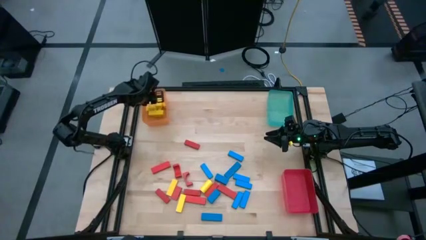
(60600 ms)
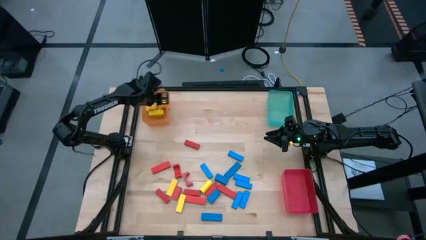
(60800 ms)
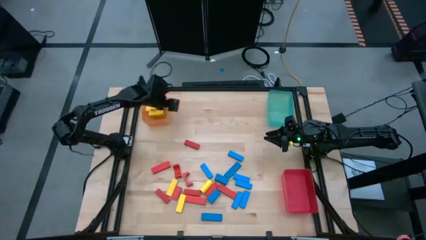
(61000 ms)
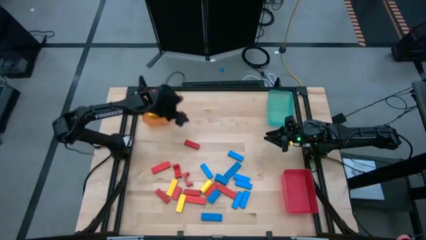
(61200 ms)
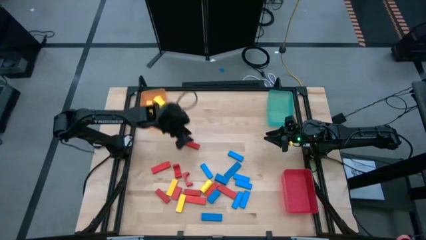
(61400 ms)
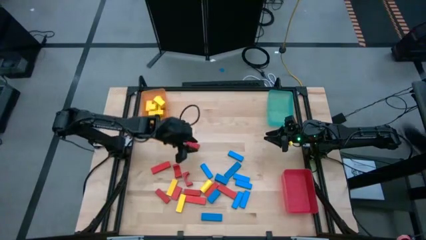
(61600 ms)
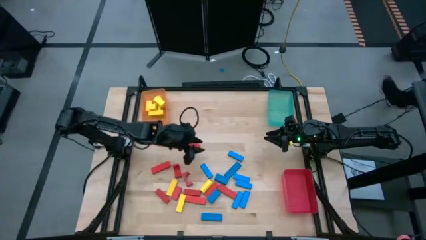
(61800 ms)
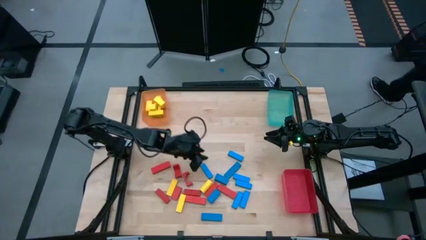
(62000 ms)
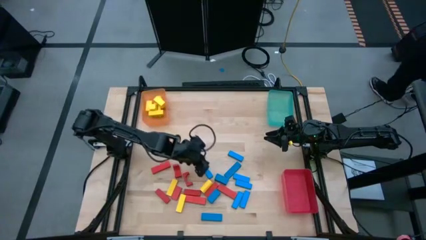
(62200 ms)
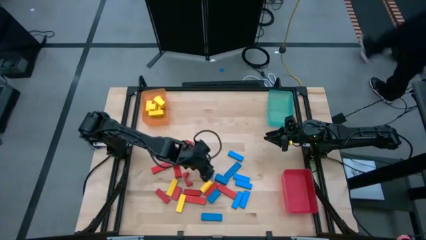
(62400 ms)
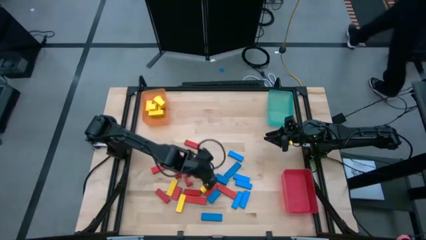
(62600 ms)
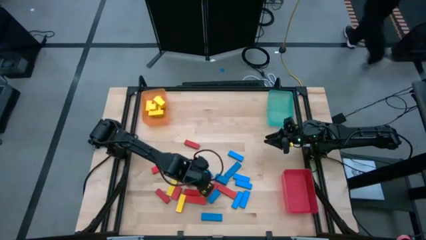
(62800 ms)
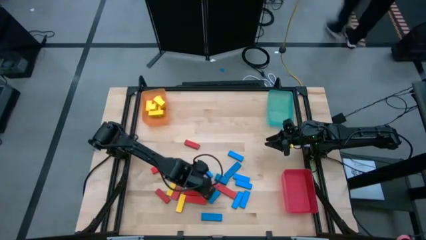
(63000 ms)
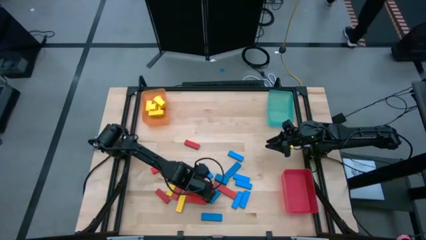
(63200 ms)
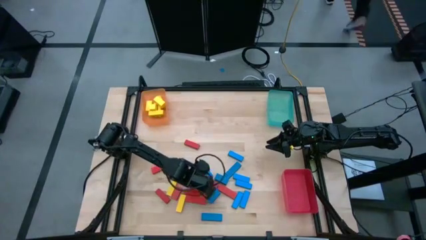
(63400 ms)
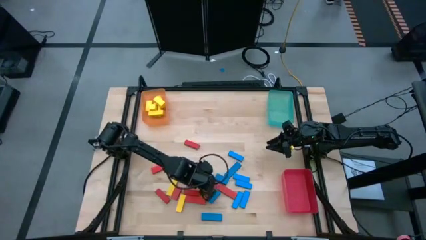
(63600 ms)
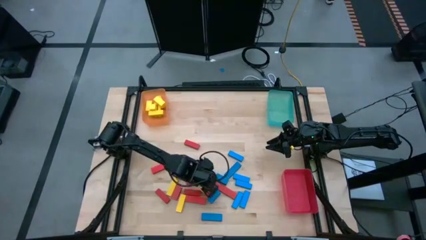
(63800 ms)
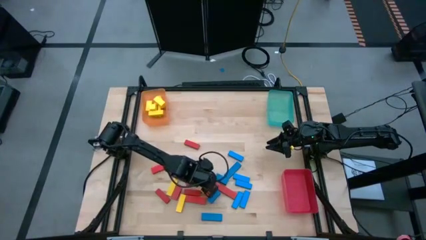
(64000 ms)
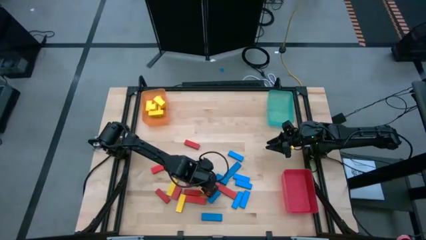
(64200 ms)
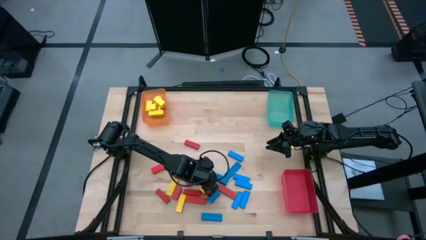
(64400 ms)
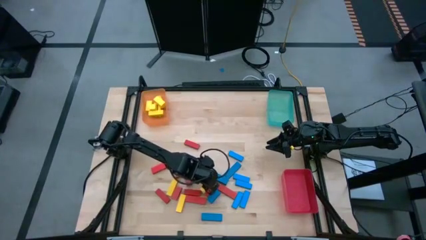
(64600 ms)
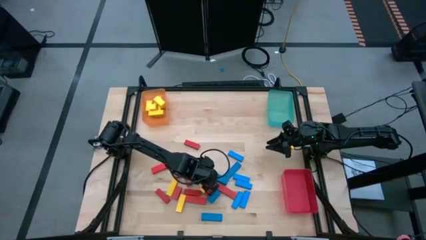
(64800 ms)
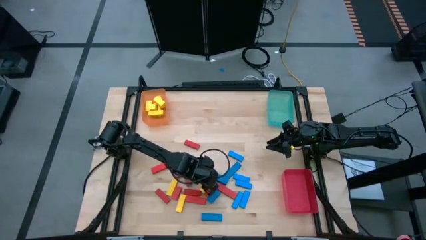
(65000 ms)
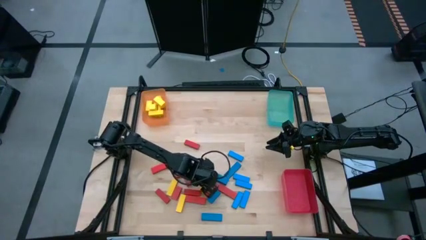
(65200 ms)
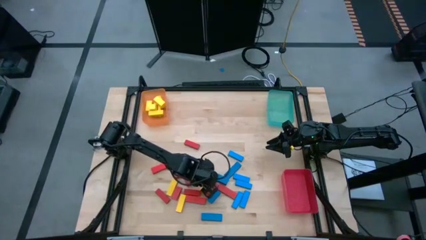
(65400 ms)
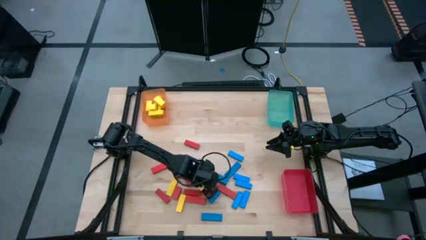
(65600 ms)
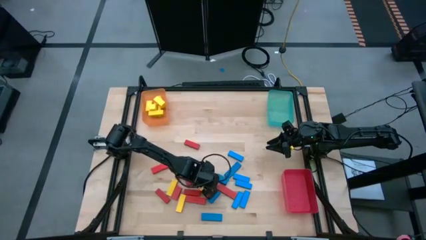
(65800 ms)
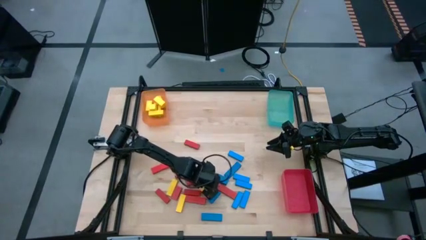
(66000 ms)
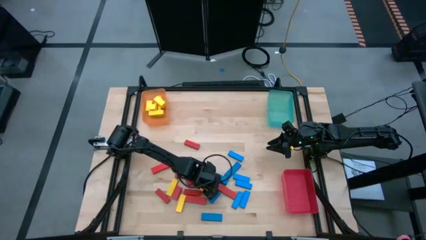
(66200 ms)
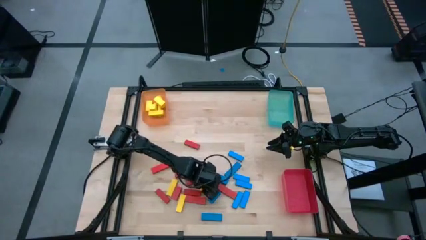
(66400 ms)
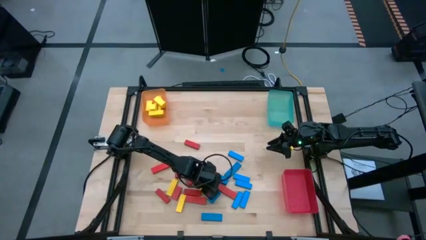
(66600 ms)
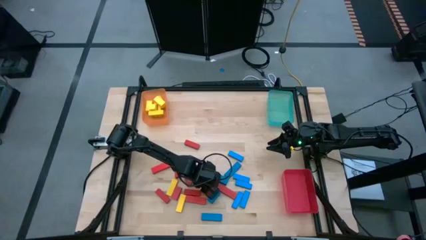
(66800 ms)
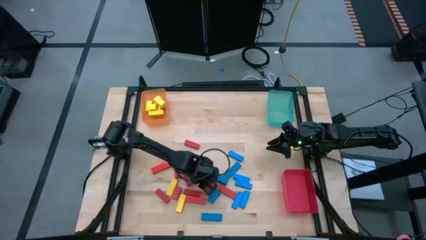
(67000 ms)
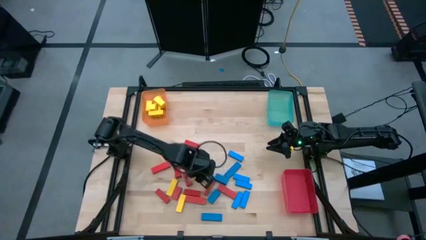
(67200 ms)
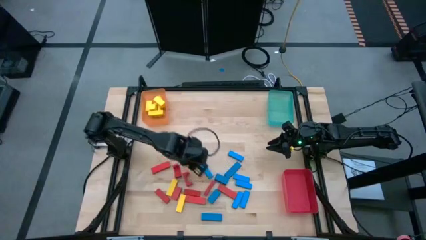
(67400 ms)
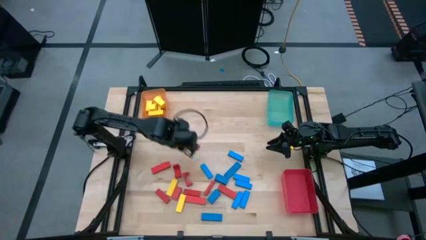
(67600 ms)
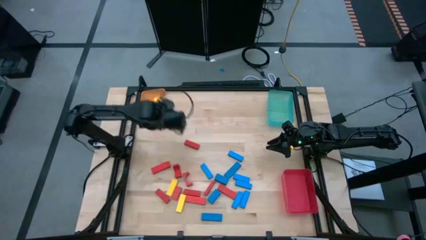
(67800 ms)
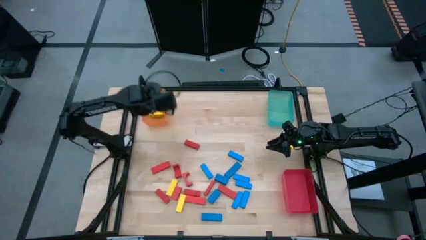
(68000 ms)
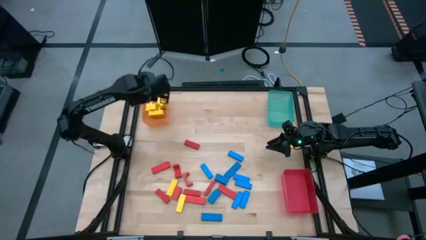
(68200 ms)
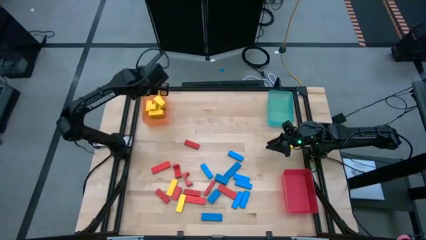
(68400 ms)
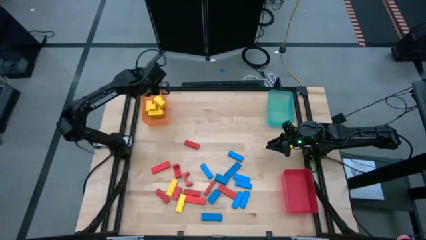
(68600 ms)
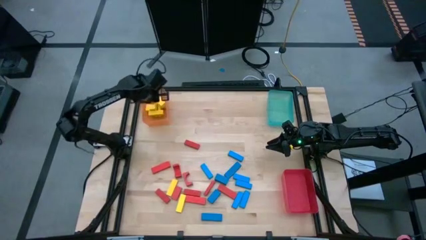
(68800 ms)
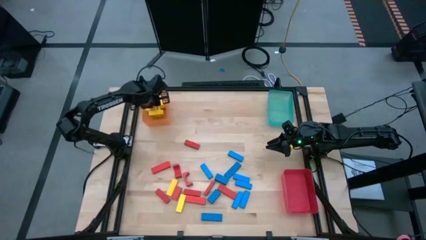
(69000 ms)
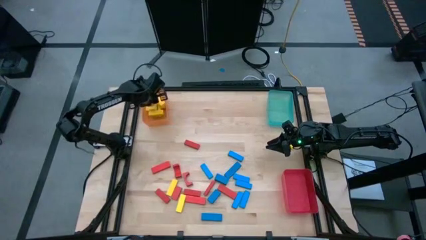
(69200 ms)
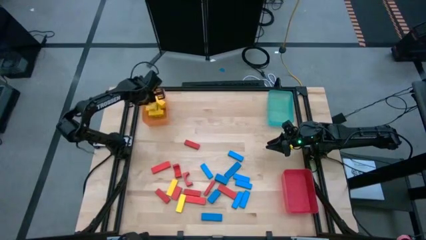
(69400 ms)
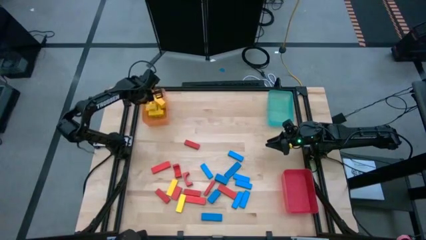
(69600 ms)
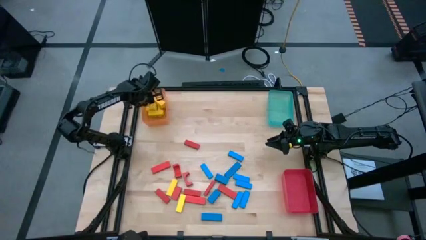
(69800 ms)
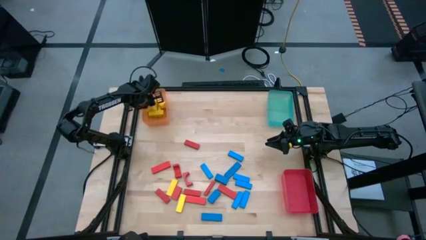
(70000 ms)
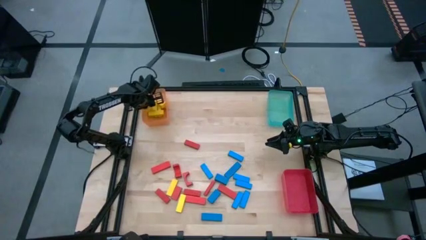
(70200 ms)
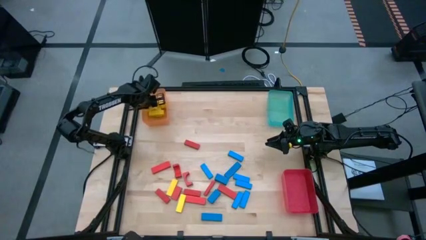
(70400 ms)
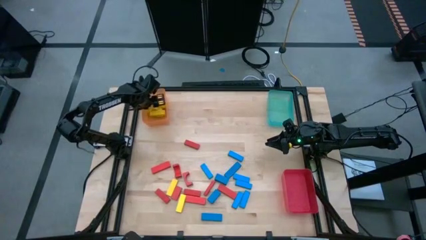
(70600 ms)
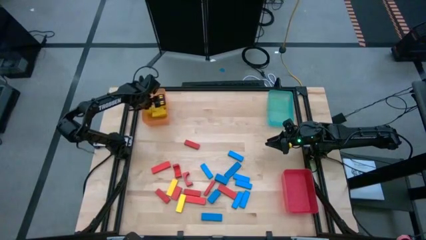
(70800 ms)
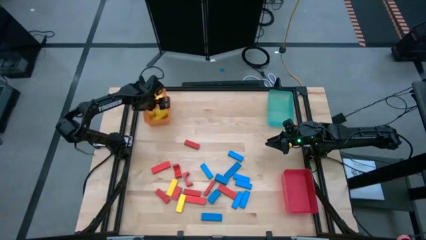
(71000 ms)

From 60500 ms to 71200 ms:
Task: Sort blocks
Put the yellow block into the orange bin

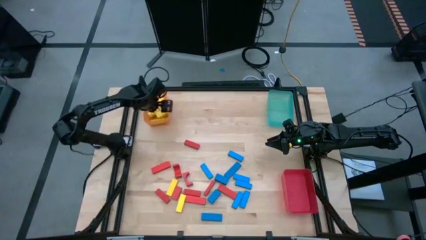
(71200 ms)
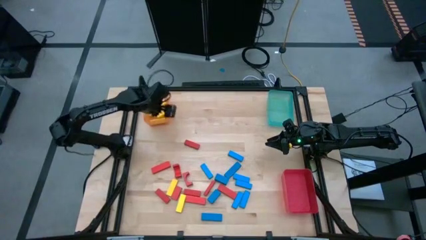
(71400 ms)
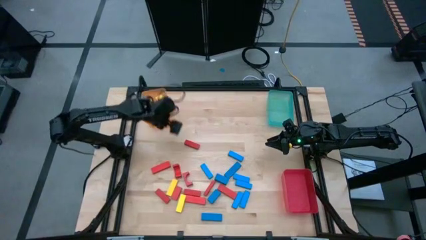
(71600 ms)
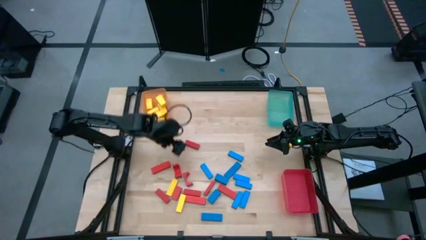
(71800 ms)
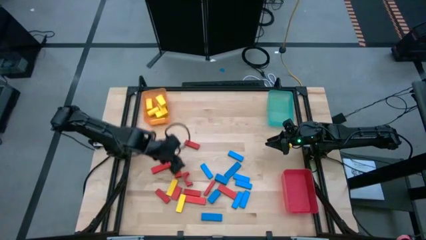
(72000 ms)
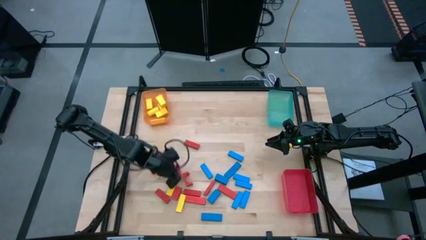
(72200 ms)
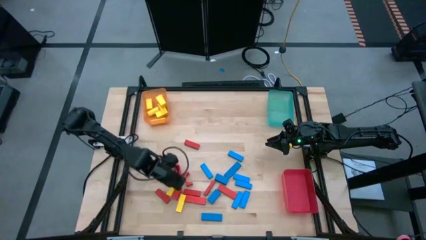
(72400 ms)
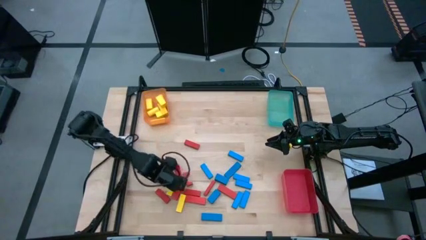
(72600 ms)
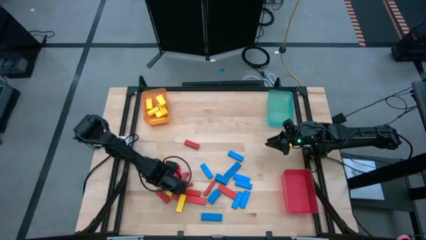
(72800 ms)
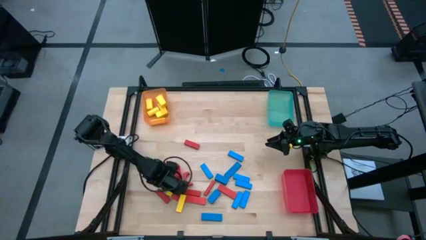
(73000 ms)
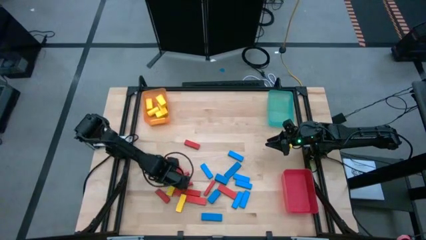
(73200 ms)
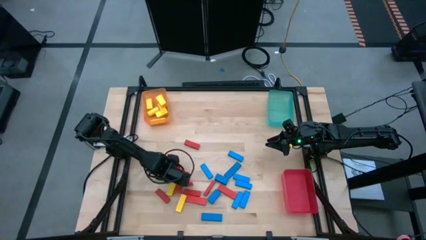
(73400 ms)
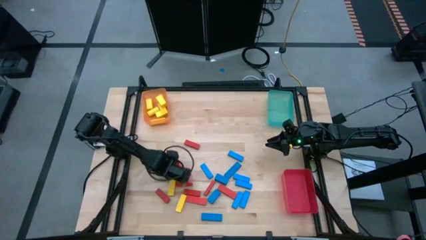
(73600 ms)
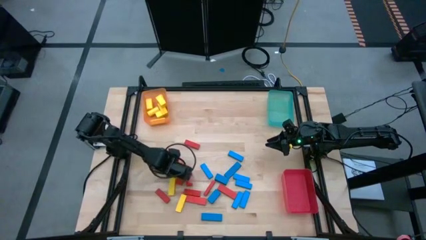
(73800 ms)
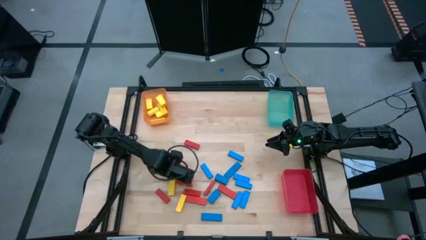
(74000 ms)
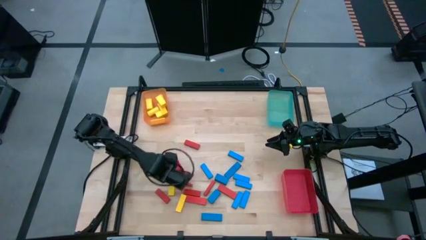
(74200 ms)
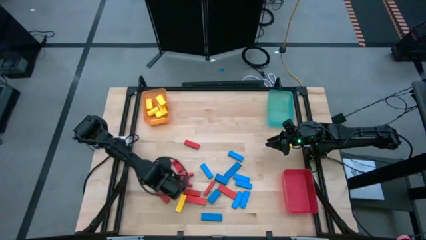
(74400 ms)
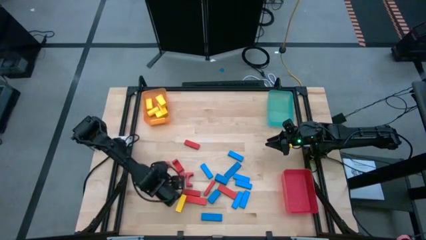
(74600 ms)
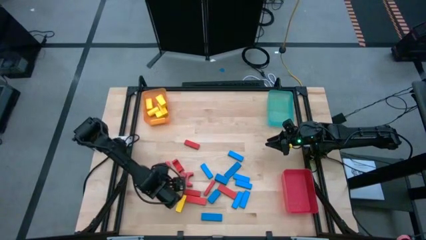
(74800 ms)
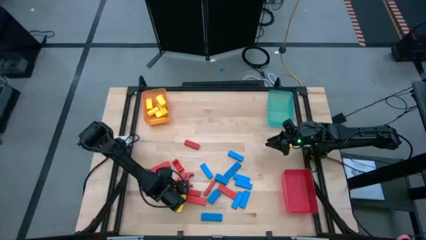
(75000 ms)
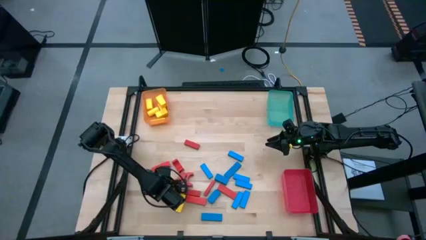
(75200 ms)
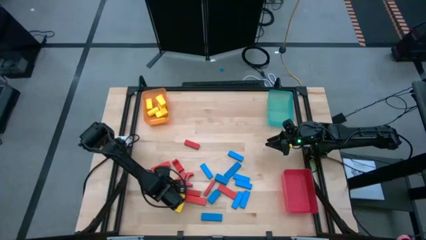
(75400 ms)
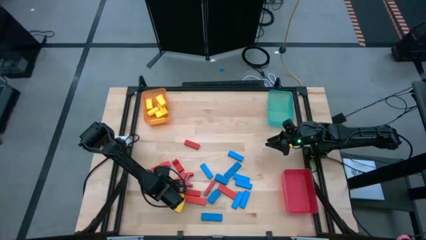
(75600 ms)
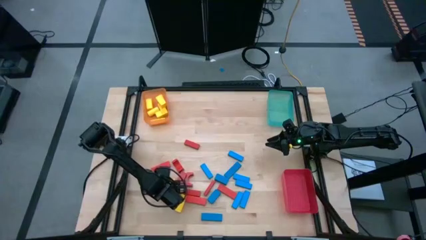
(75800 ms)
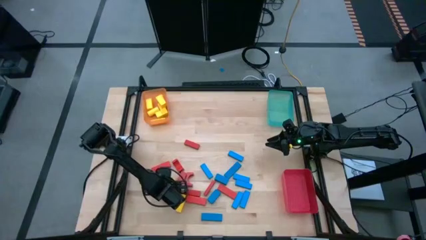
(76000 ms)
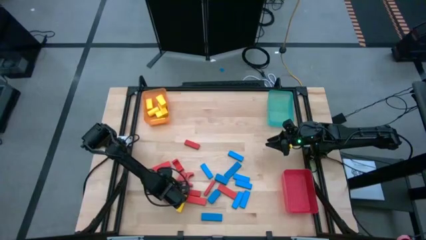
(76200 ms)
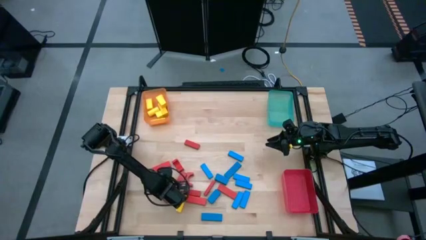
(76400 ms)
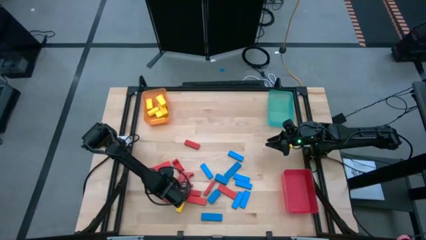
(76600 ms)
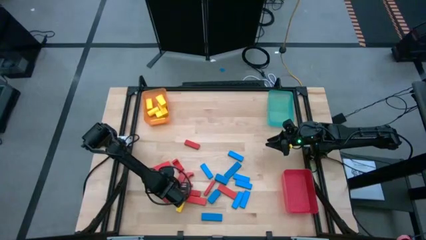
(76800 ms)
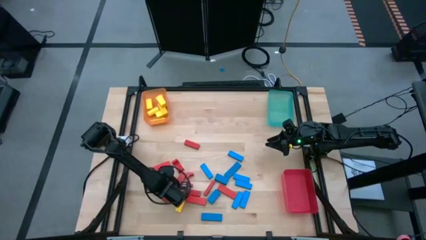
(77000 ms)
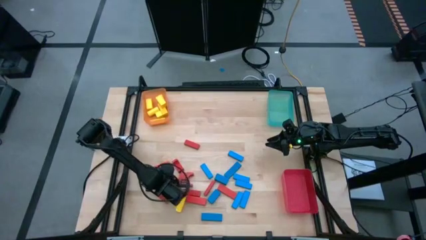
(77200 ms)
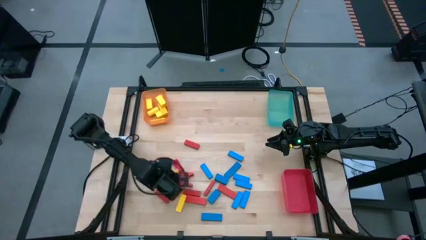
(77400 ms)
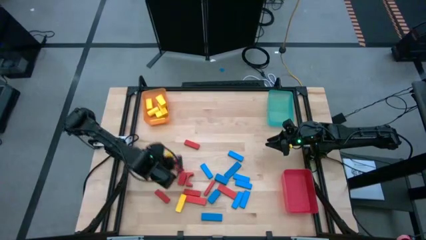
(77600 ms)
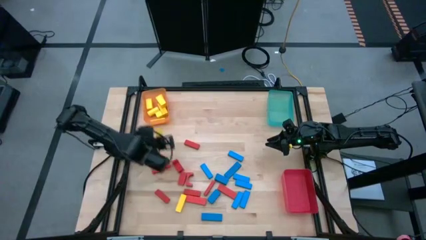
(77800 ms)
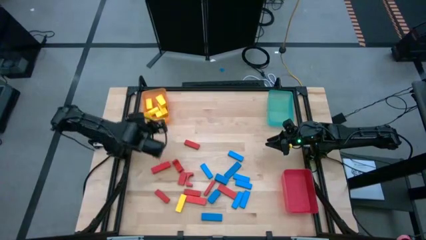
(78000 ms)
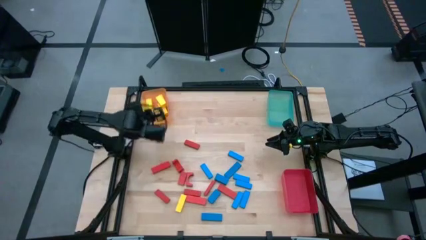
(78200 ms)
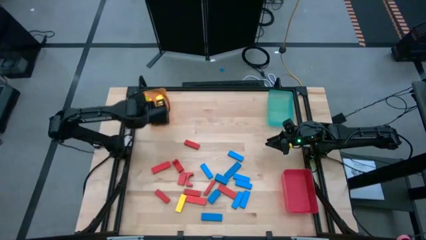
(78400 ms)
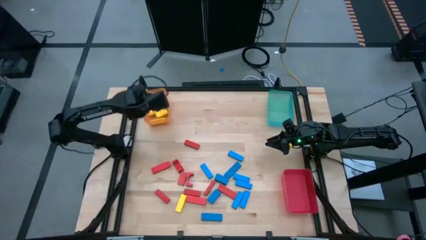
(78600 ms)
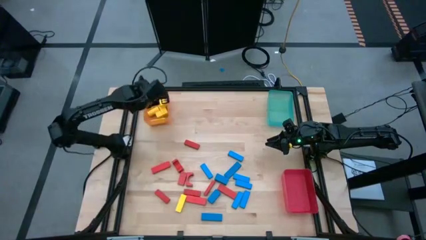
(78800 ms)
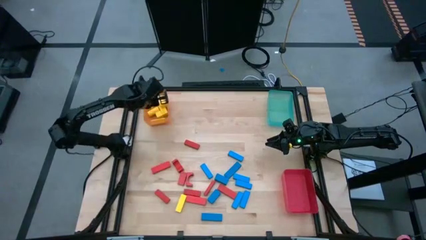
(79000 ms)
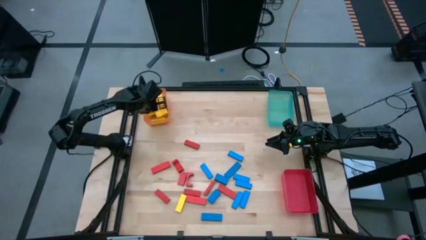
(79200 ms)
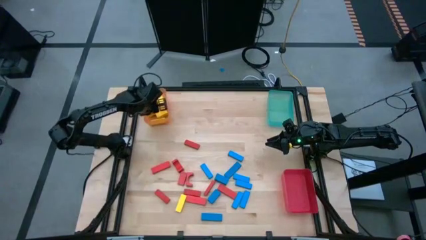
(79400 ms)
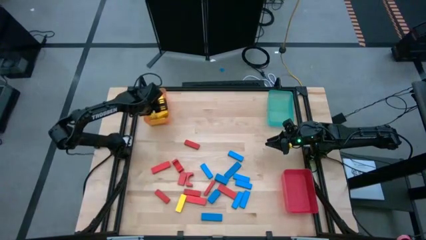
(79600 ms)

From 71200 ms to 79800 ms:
Put the yellow block into the orange bin
